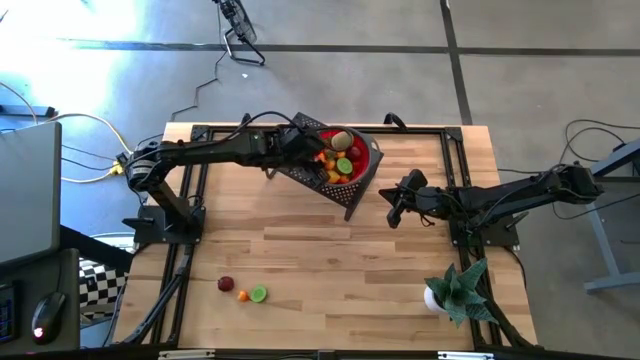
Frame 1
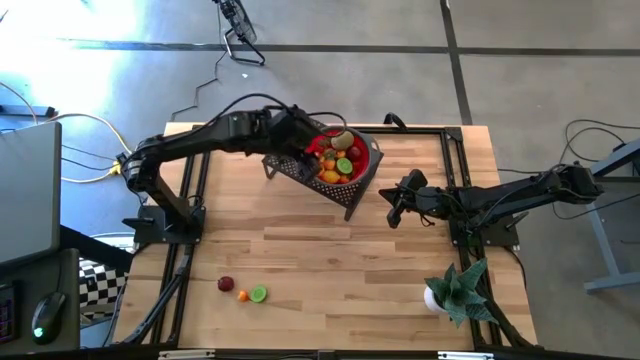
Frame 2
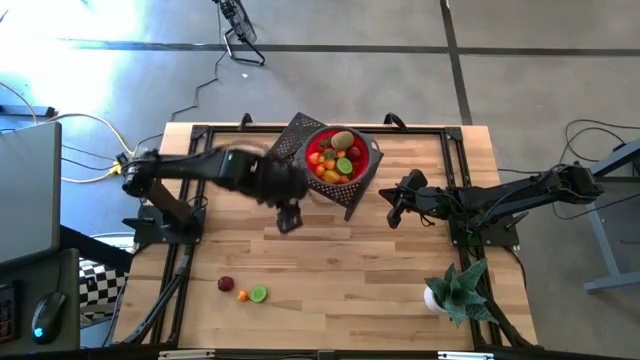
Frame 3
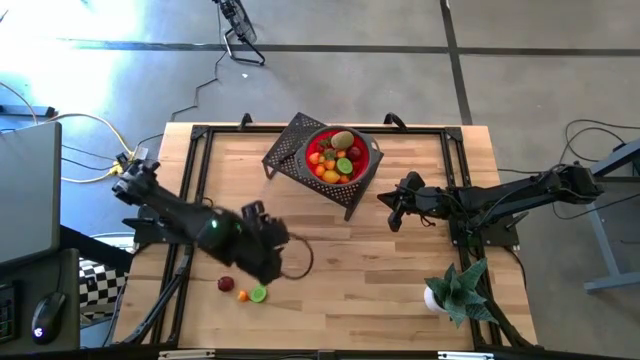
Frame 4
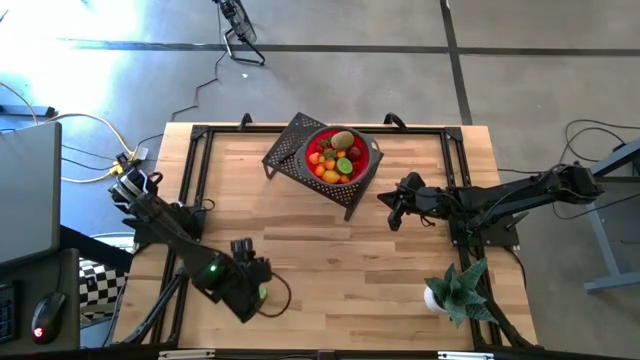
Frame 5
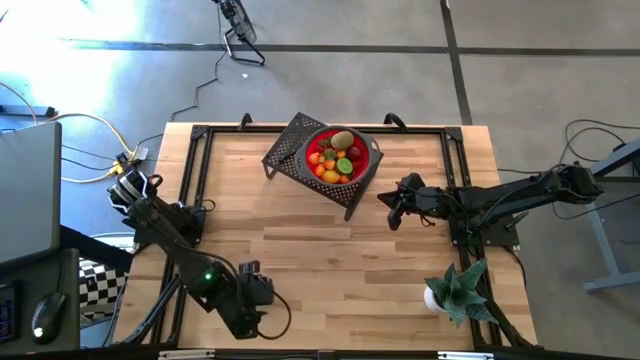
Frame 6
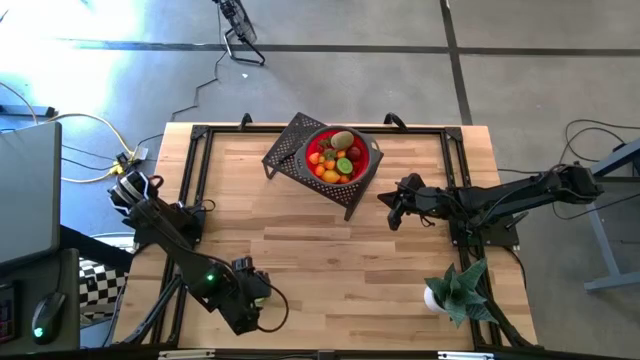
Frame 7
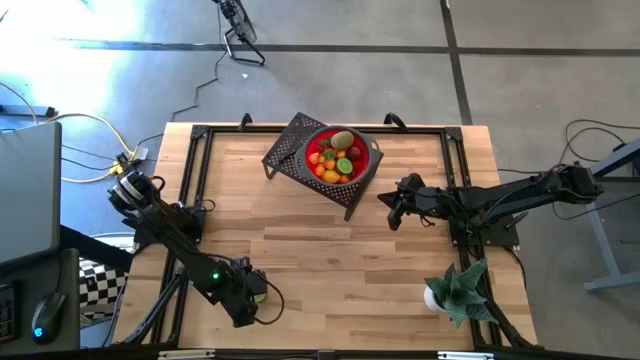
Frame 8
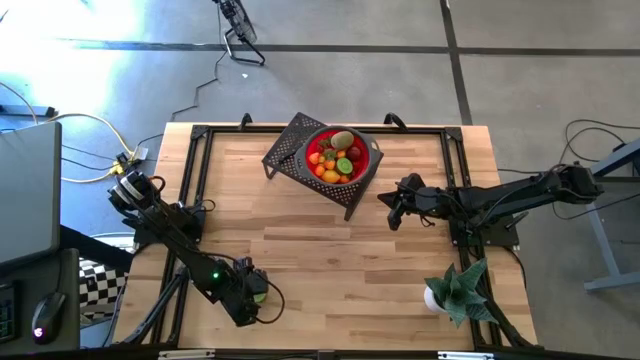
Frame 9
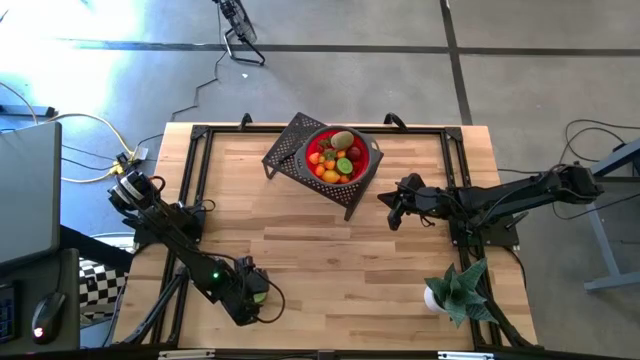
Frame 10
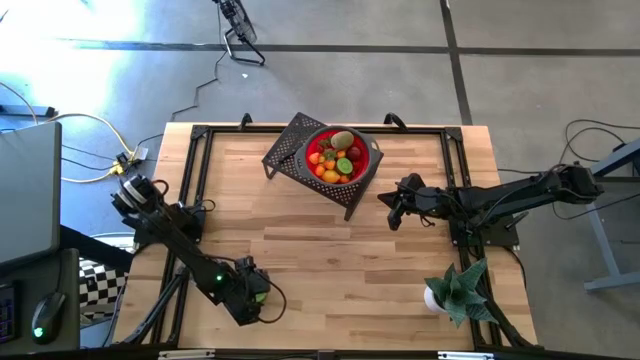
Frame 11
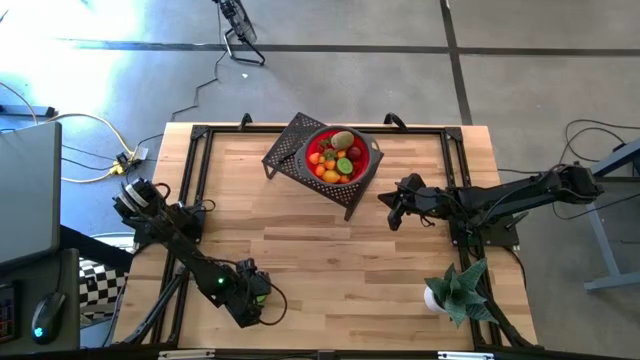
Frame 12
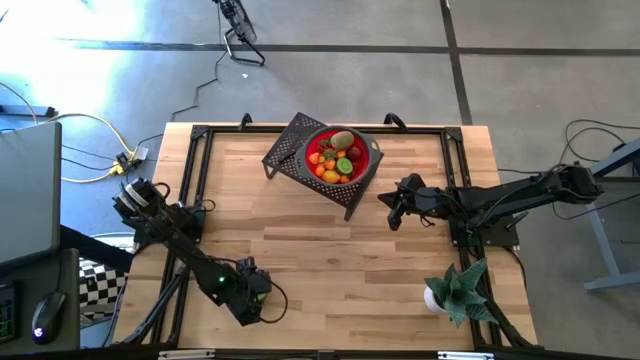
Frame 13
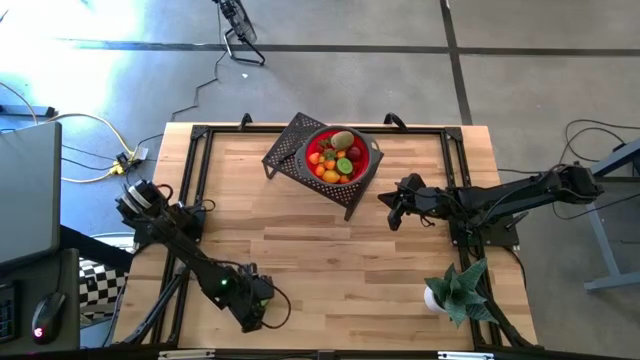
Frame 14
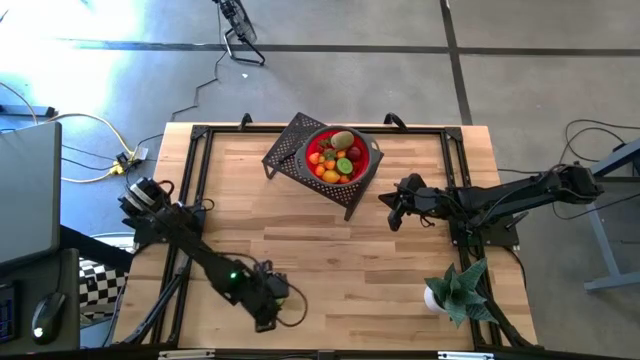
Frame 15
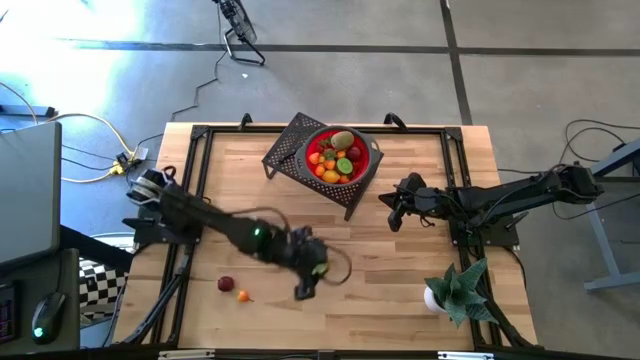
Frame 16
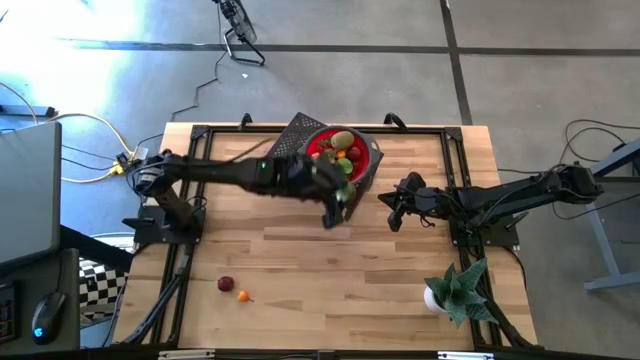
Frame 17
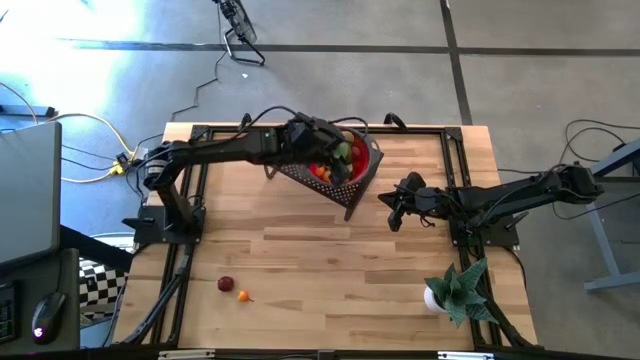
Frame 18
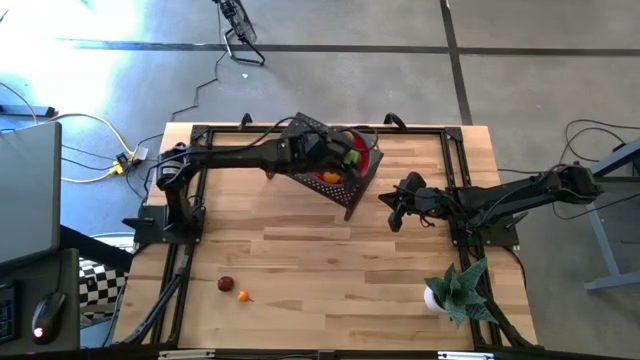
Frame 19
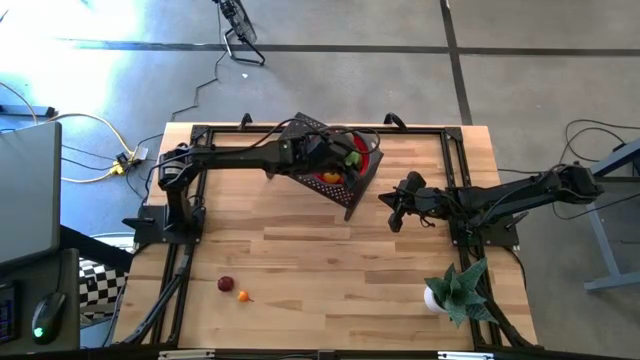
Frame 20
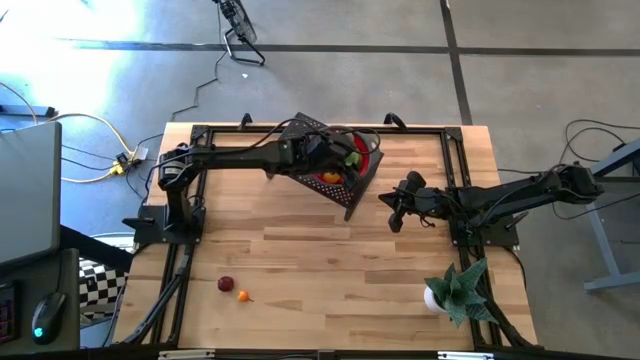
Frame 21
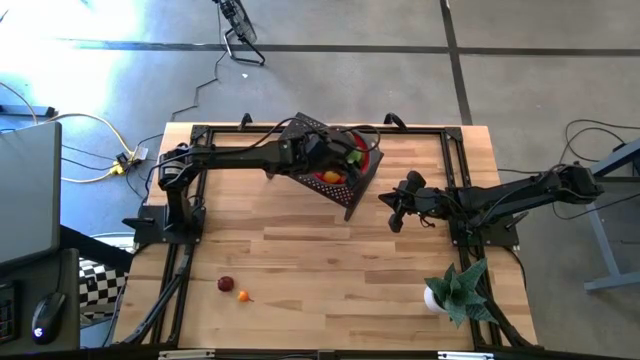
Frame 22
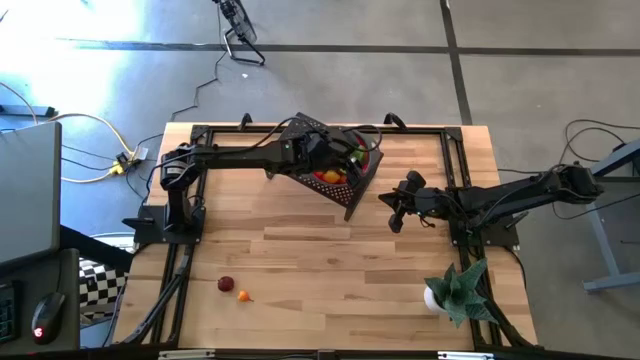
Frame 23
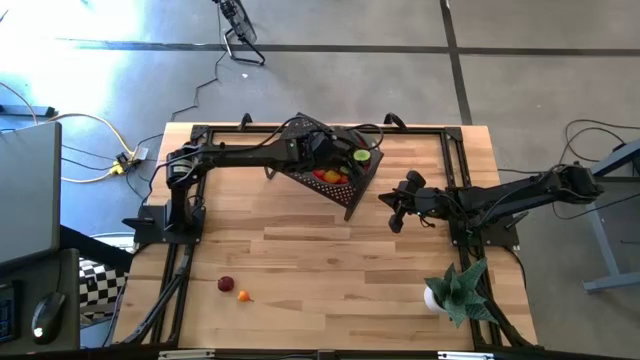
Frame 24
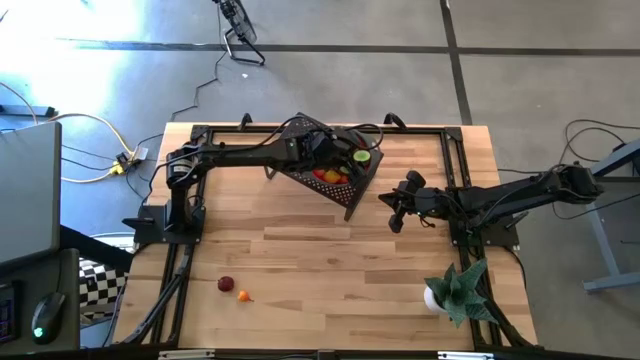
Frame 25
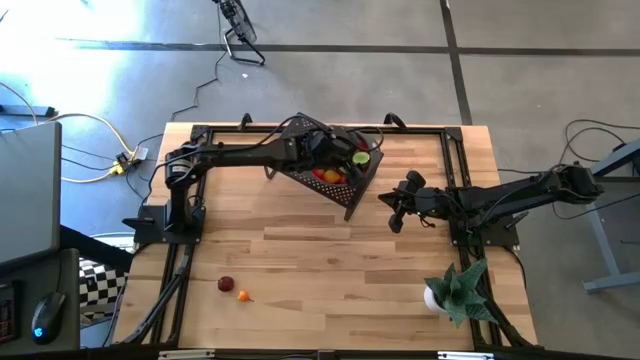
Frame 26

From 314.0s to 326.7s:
Task: Pick & Place Fruit
Put the sliced kiwi into the strainer bowl on the shelf

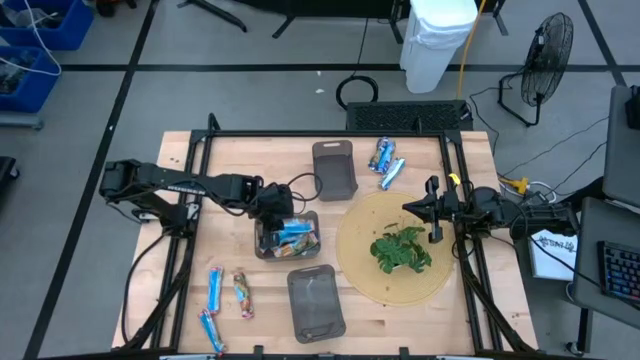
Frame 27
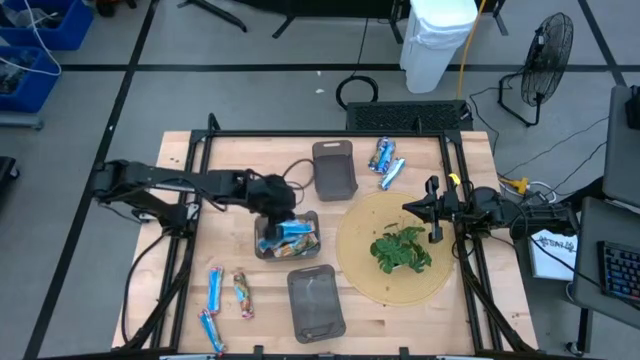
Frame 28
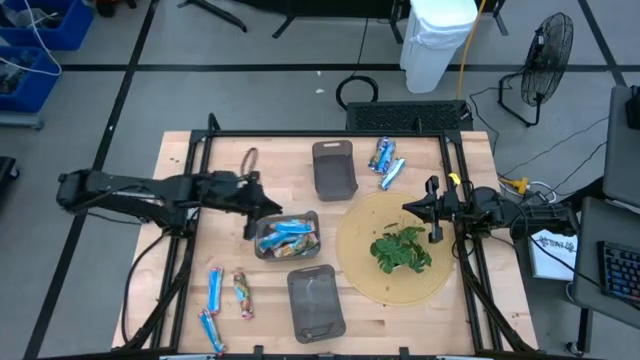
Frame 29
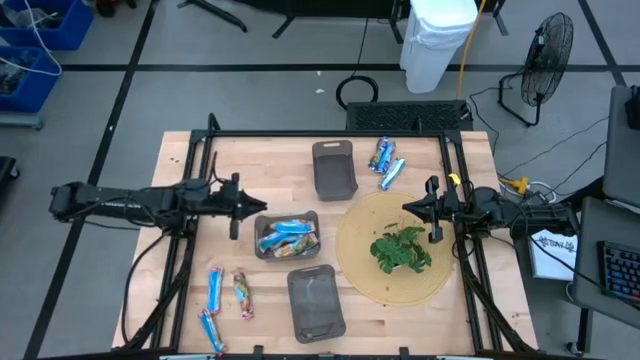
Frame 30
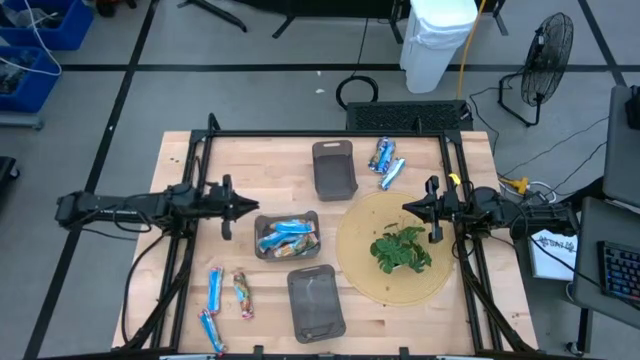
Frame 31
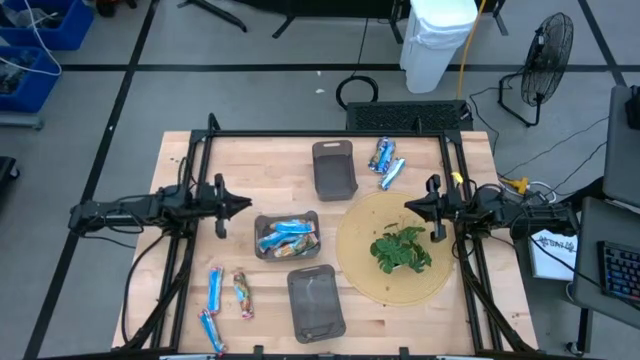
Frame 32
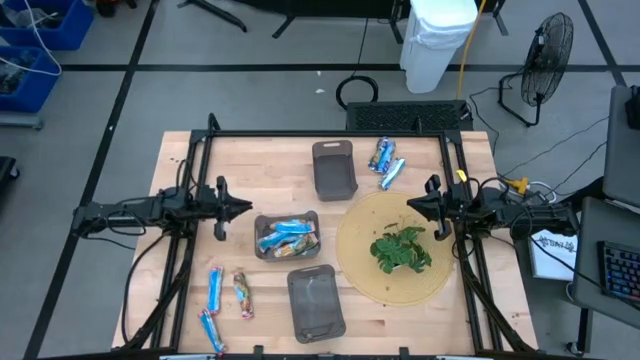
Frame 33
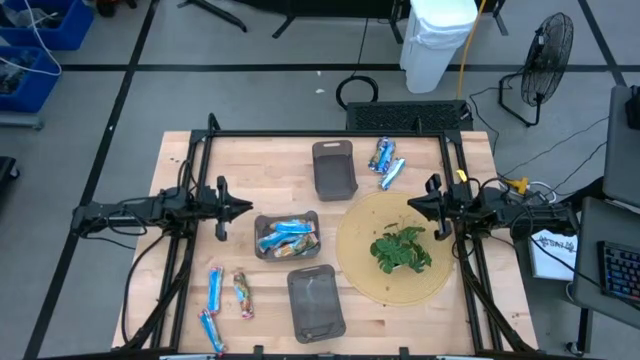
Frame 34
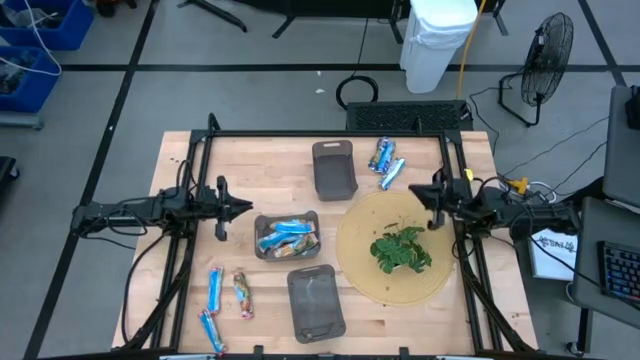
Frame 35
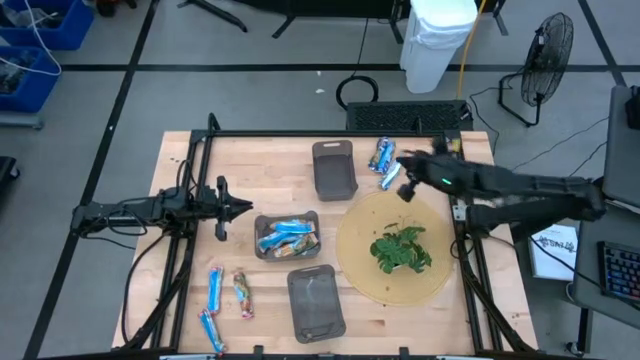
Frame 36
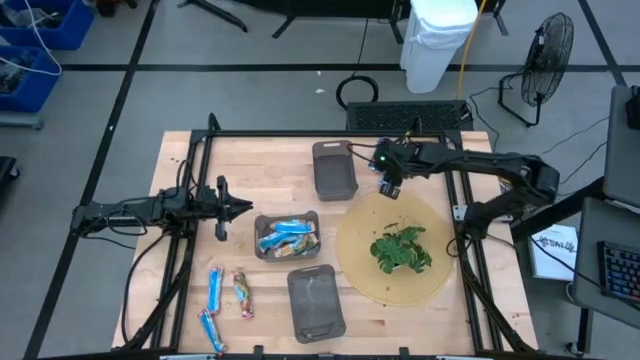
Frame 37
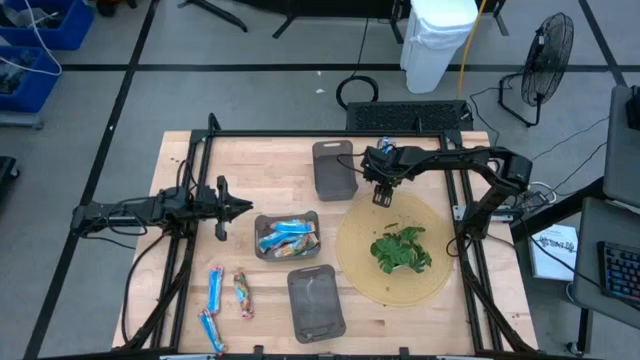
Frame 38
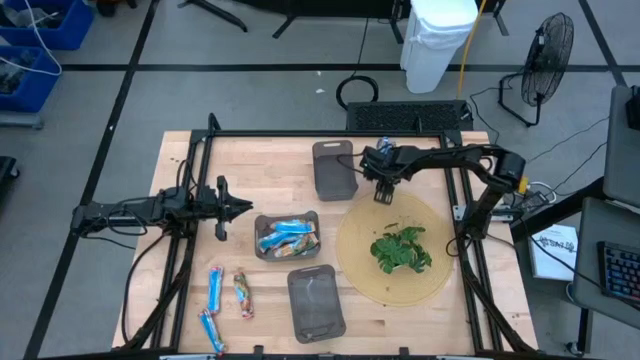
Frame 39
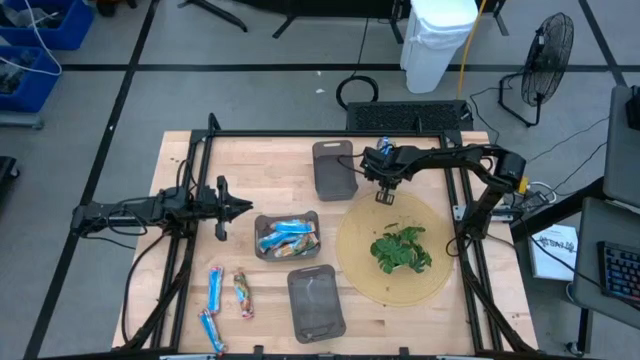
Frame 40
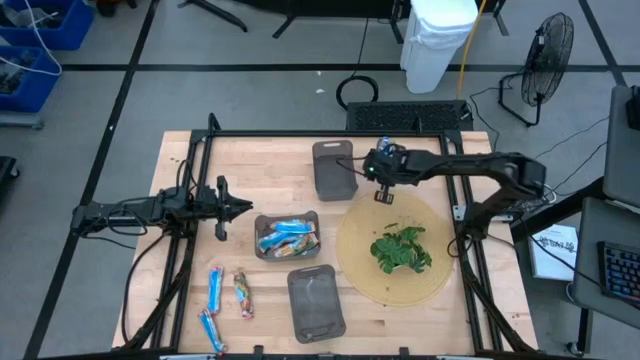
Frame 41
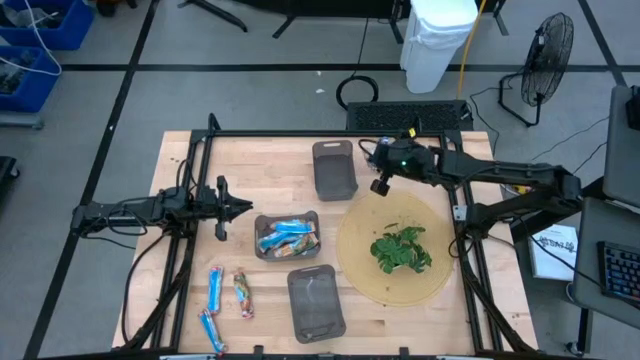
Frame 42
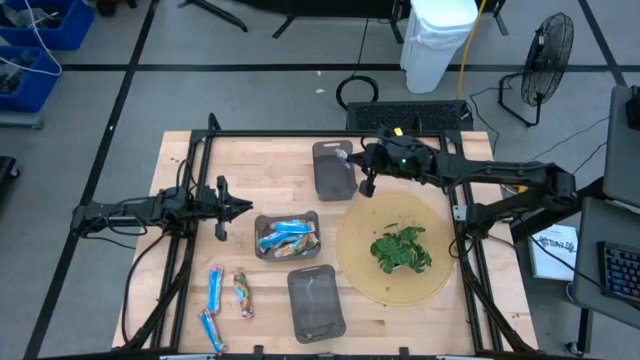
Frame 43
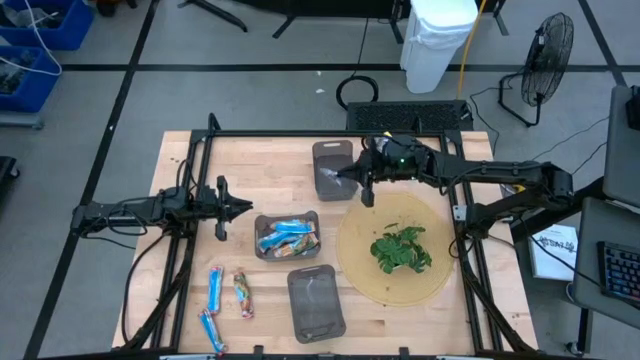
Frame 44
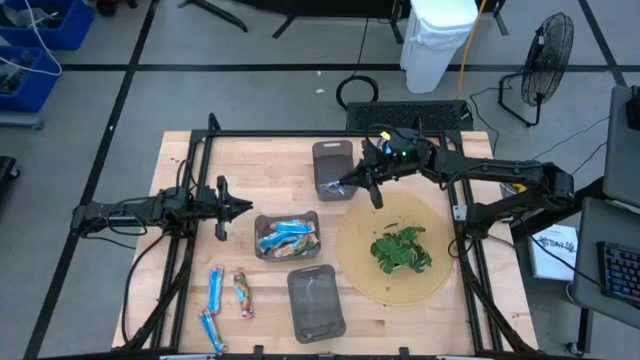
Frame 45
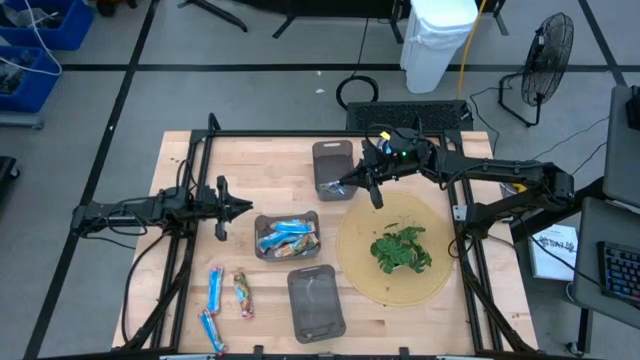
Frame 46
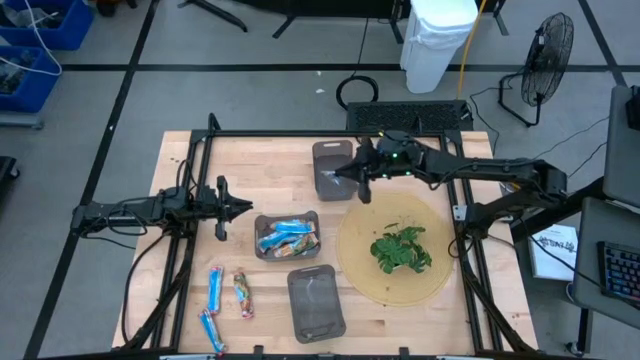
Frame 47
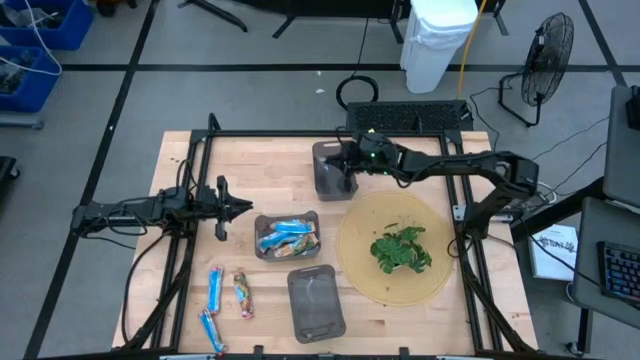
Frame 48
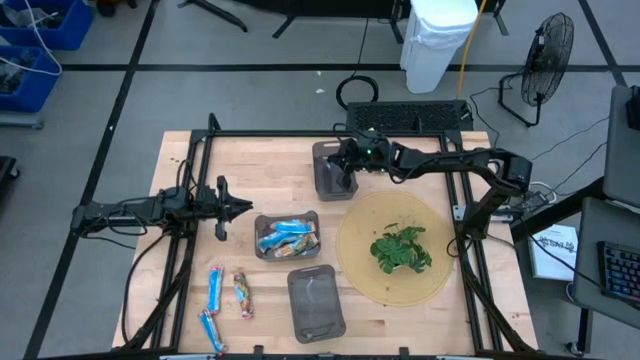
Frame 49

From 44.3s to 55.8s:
Task: Pick and place Granola Bars by type
Put the blue granola bar into the top black bin
